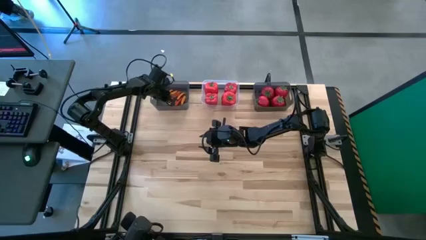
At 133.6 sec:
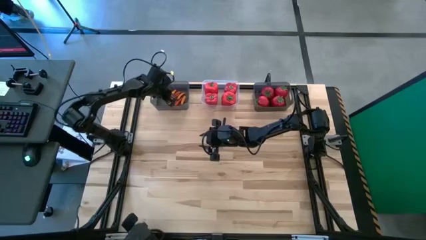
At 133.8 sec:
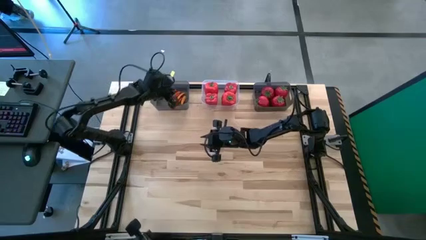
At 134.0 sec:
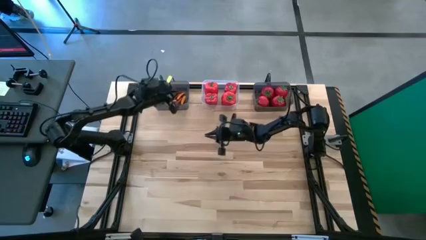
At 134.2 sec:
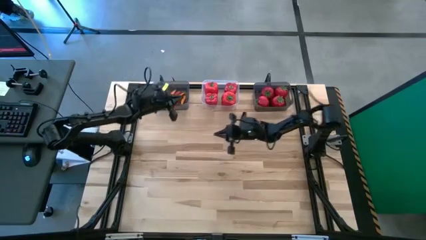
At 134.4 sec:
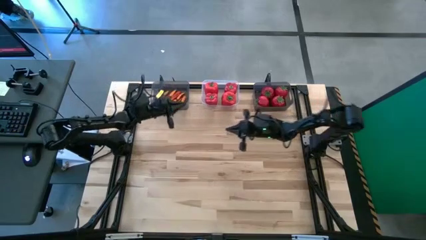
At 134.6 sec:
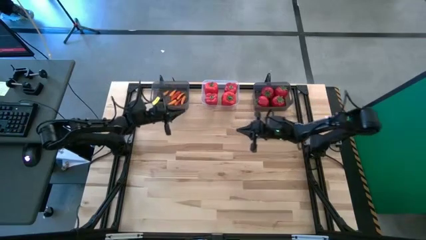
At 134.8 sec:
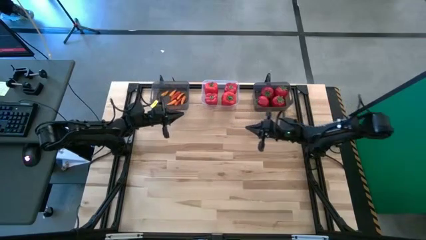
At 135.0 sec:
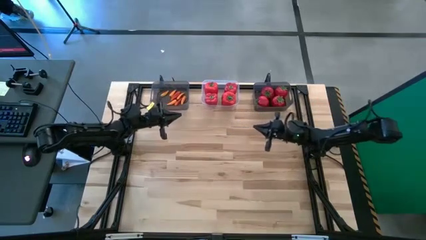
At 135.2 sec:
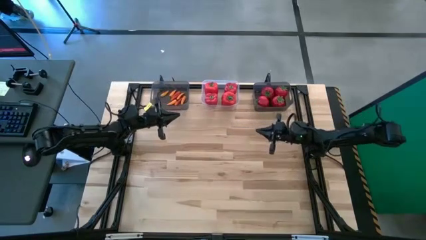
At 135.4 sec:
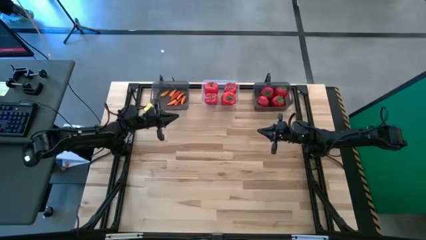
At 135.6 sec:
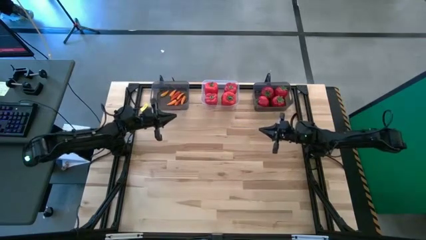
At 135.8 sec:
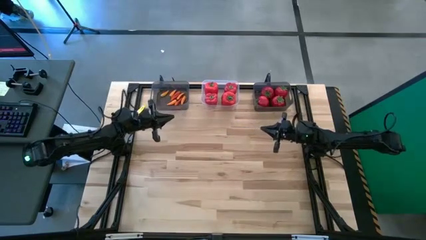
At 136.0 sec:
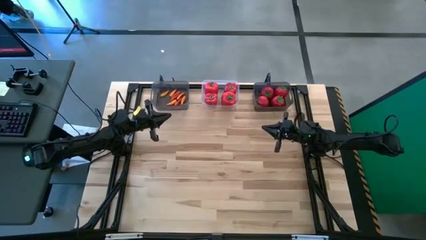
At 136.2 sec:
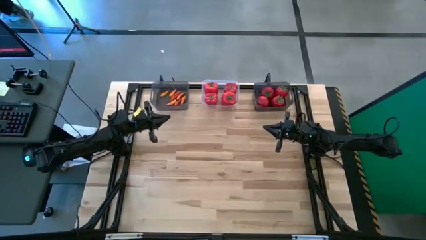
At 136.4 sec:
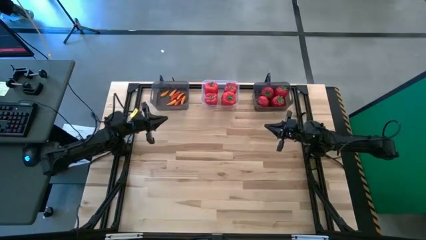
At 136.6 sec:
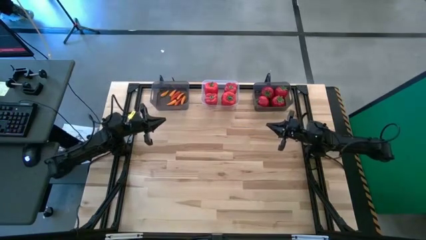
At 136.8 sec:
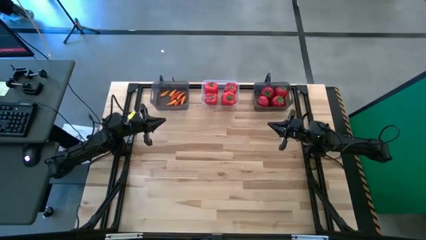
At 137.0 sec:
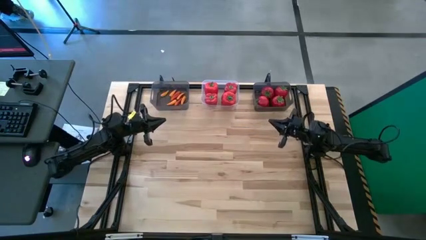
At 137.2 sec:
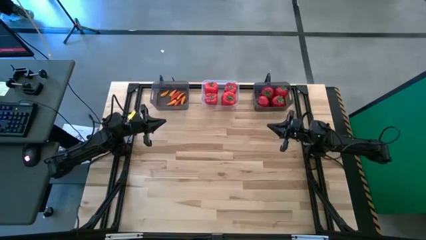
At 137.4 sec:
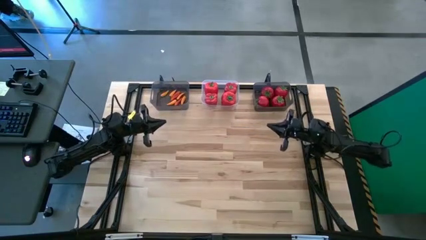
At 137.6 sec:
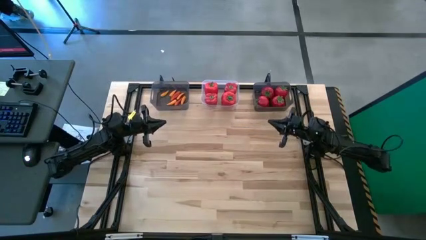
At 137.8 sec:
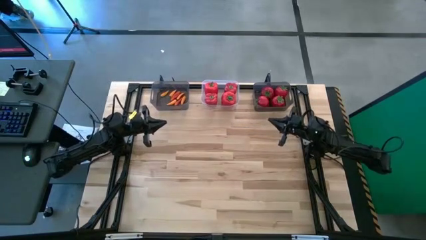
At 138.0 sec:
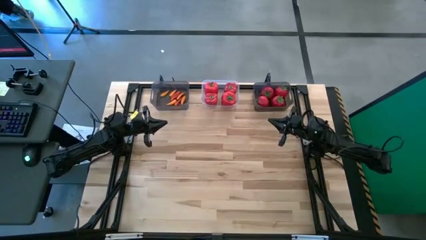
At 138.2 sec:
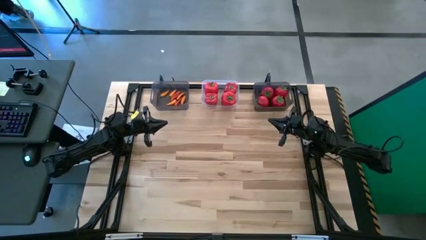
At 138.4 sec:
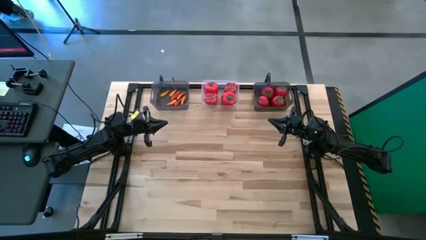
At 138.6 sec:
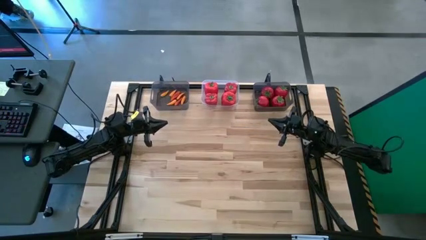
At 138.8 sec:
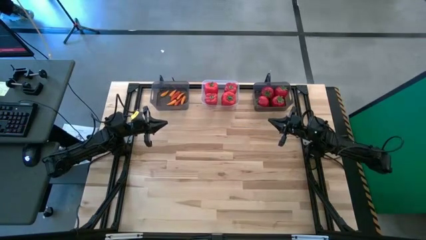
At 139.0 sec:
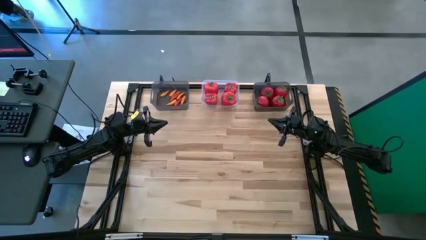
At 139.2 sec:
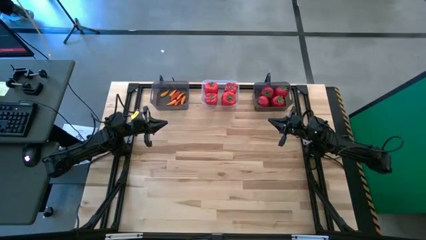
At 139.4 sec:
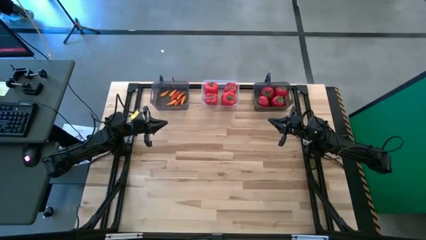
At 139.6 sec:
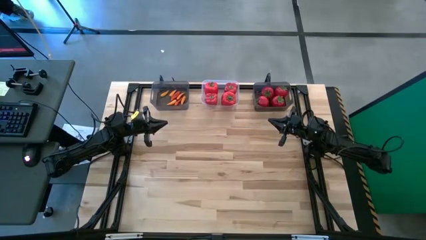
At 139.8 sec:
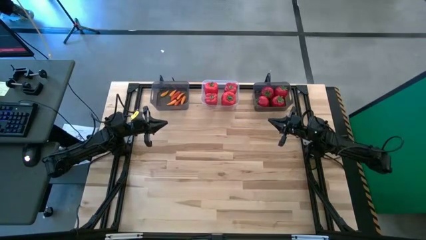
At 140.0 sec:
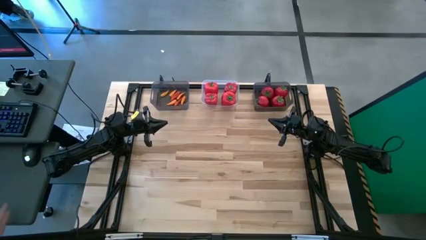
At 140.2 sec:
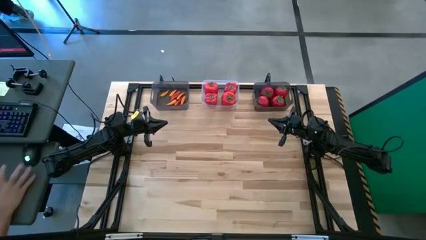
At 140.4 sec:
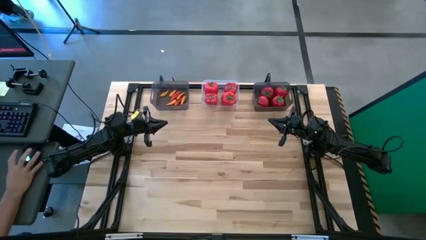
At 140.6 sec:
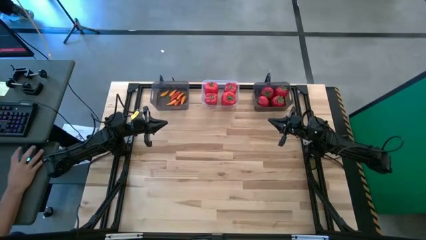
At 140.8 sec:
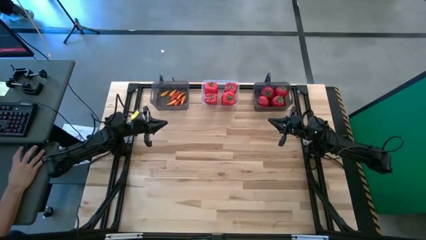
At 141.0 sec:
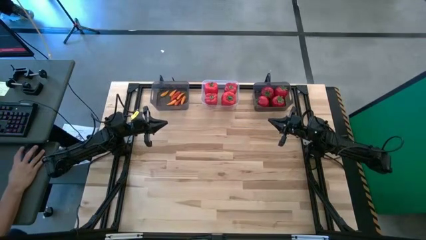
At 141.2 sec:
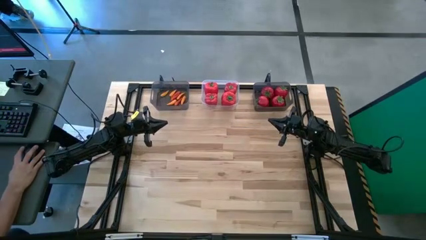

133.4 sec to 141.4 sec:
Task: Sort produce into baskets
Return to Home Position

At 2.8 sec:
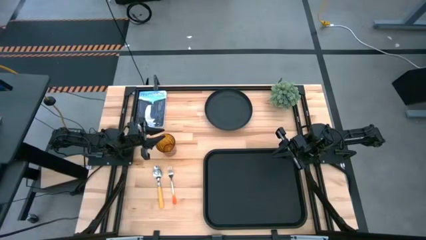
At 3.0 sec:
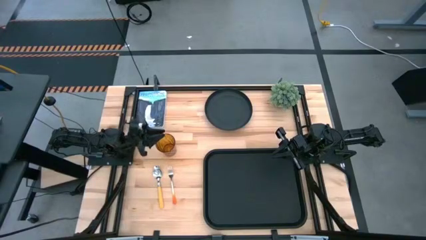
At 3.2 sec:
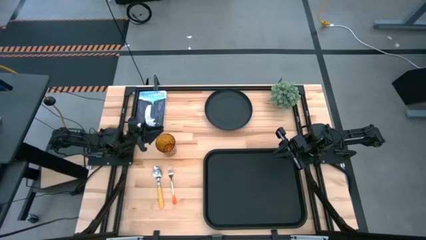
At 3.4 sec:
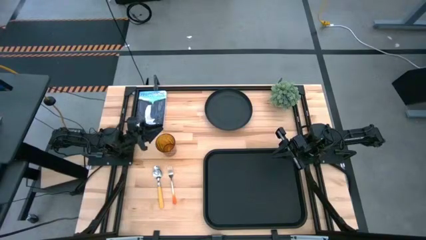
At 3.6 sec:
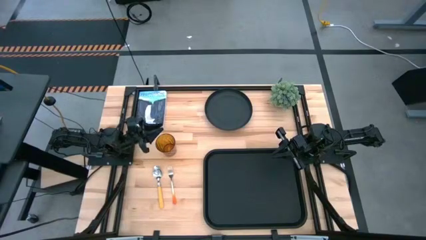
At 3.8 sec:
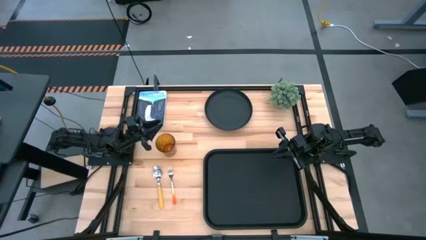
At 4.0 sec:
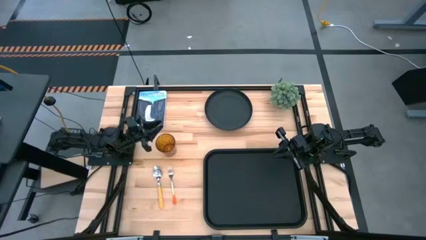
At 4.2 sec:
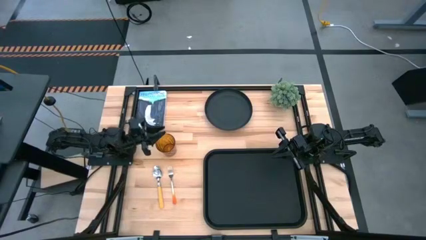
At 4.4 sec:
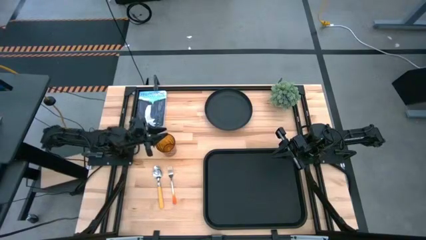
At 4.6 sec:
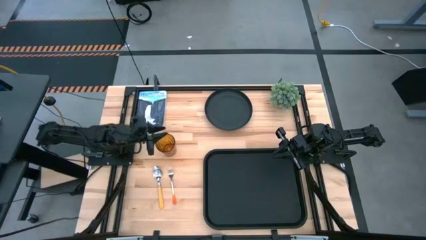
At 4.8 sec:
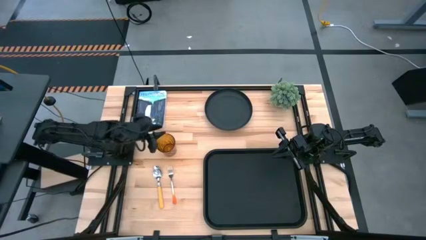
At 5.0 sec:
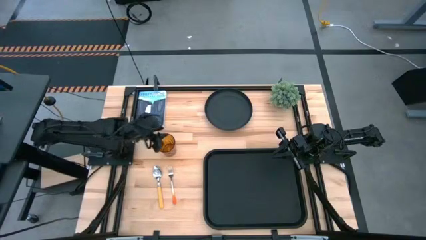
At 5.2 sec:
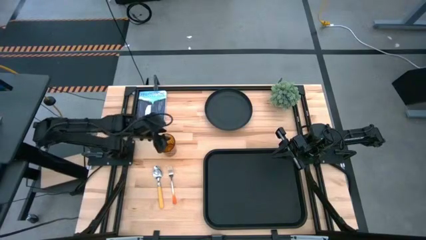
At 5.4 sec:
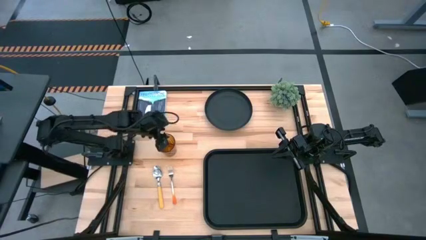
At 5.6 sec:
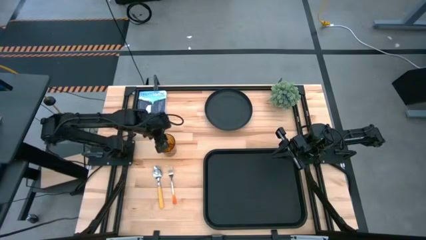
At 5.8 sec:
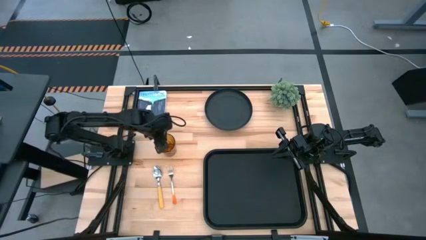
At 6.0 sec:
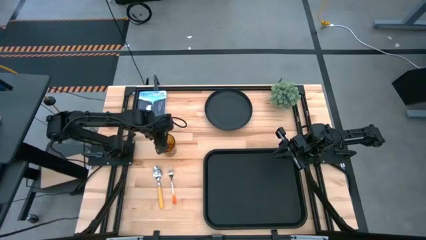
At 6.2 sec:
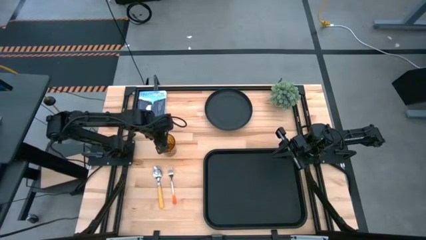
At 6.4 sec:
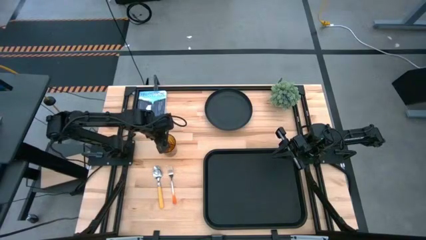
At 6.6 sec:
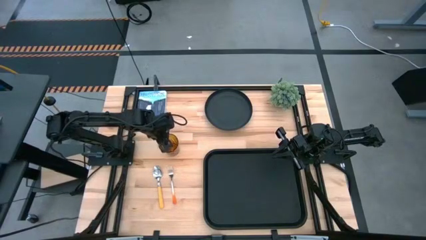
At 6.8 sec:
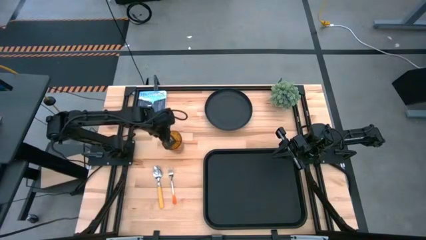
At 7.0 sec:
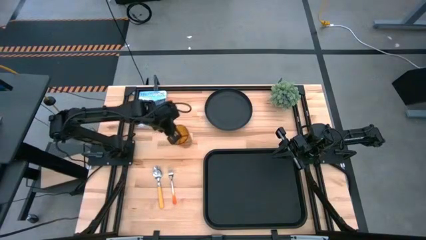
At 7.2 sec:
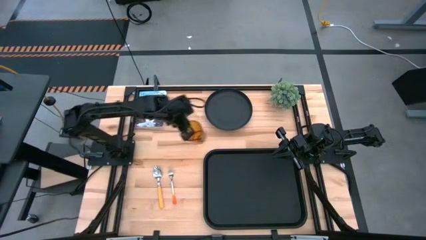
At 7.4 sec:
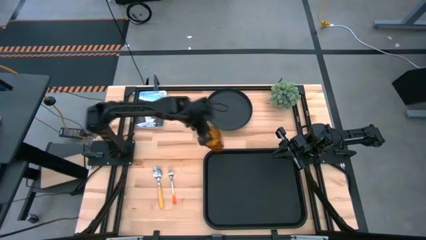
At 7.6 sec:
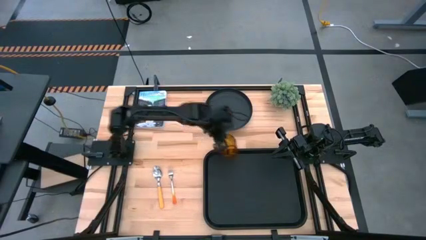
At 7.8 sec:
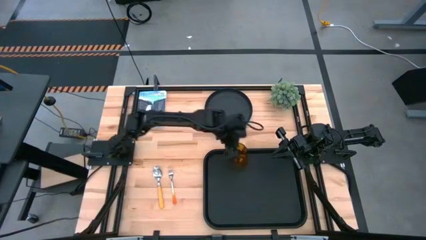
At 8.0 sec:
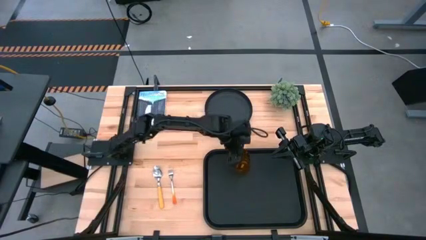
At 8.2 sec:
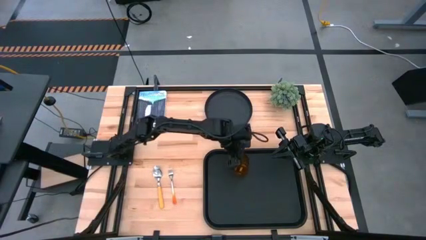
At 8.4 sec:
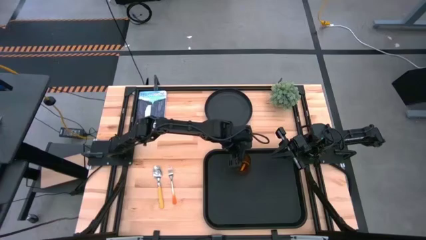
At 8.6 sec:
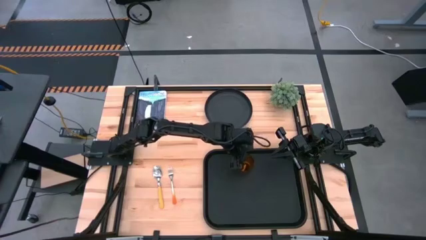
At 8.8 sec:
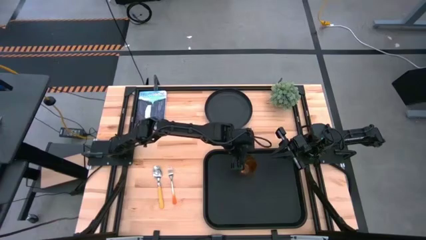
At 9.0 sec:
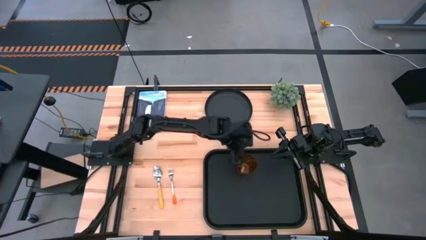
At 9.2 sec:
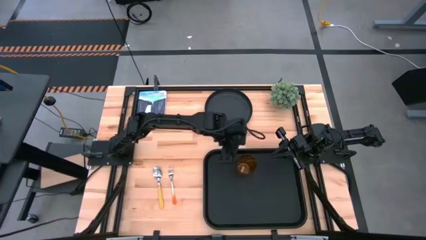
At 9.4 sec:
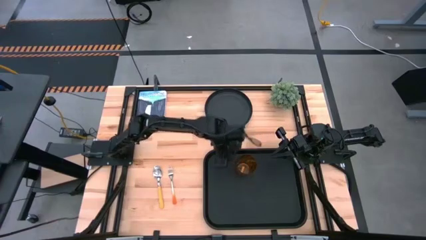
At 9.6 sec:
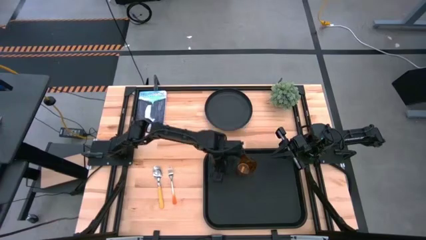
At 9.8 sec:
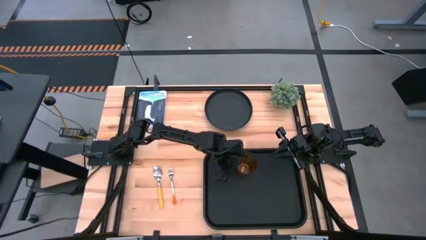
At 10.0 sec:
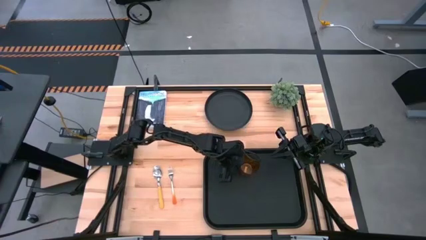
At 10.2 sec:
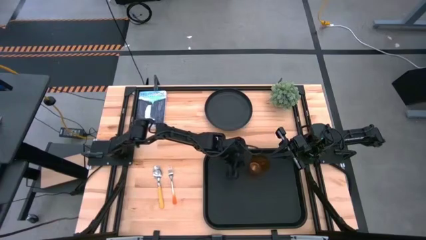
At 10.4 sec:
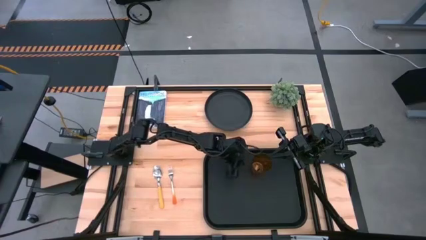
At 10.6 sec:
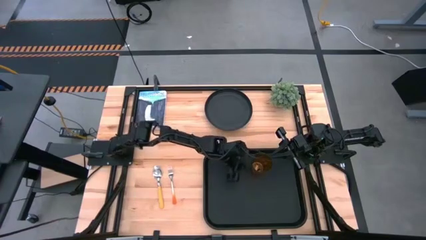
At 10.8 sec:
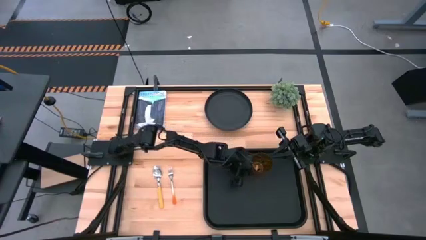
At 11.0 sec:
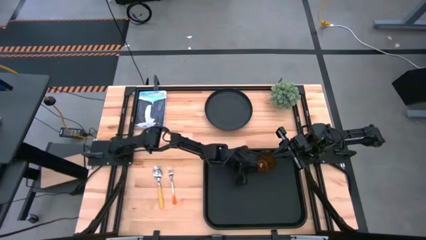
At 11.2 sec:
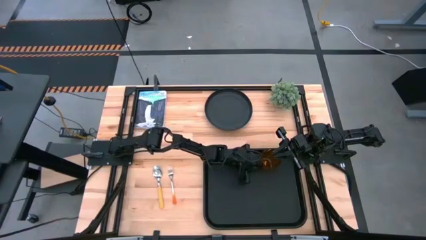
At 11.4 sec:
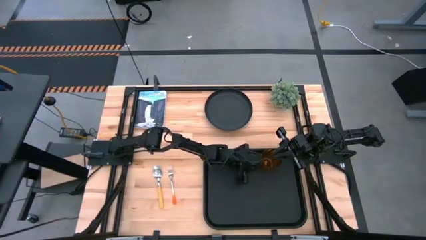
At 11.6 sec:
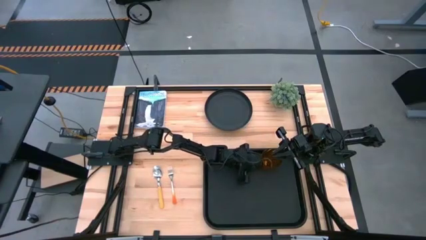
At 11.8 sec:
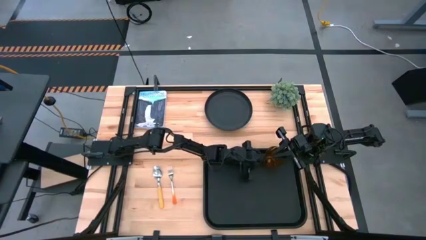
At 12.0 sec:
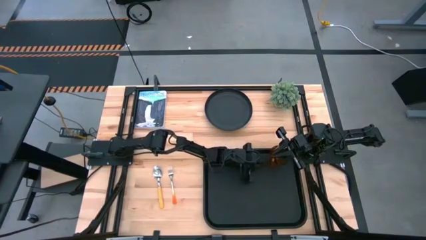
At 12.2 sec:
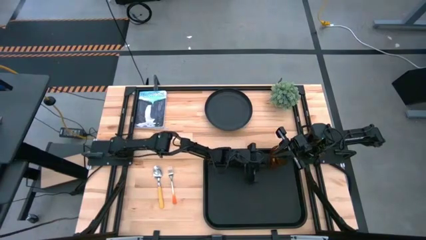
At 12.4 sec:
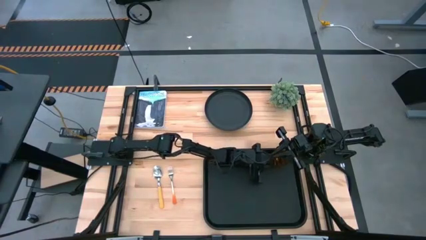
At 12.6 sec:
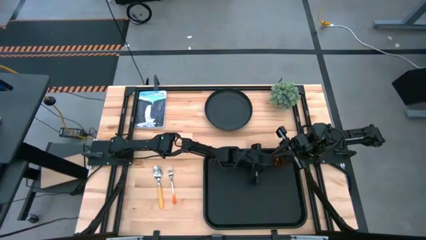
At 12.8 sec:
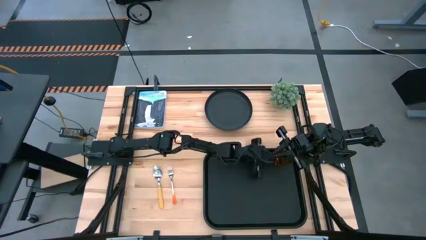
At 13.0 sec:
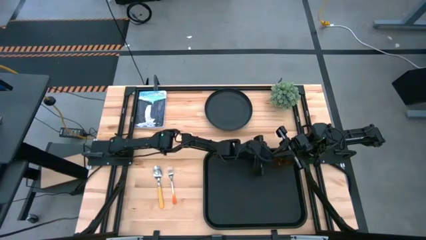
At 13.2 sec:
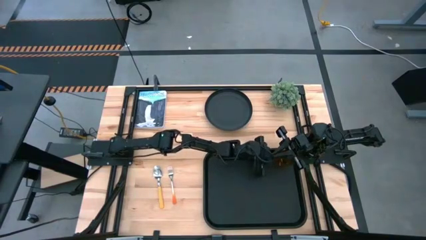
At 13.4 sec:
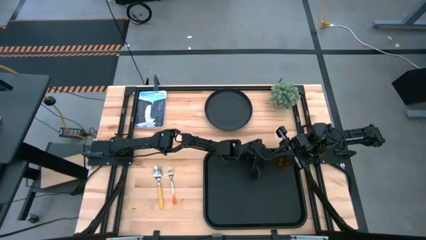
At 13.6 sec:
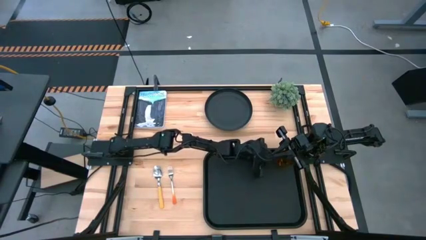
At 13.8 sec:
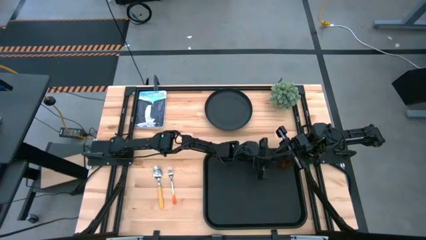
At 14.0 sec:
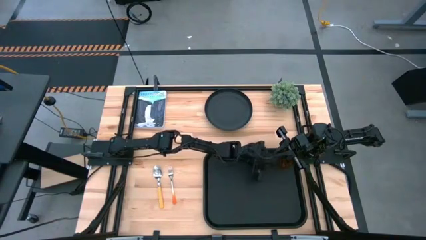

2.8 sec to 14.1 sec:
Task: Pick and place plate/cup/fork/spoon on tray
Put the brown cup on the black tray
